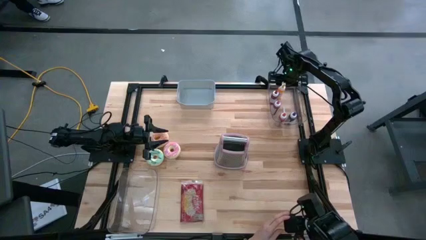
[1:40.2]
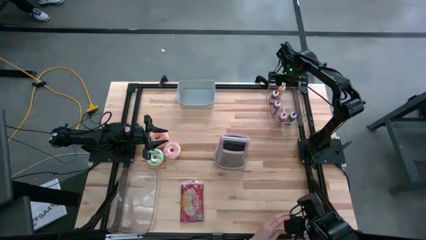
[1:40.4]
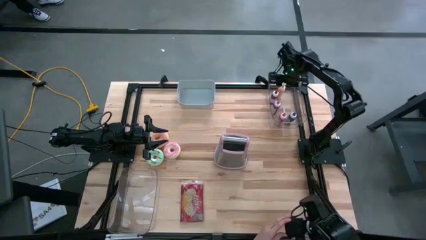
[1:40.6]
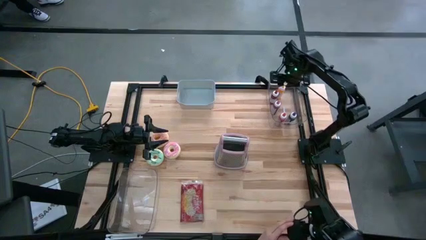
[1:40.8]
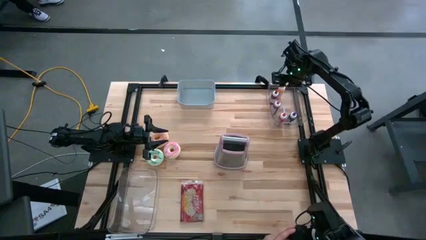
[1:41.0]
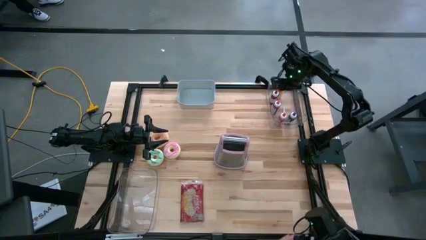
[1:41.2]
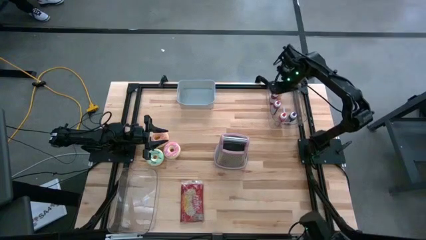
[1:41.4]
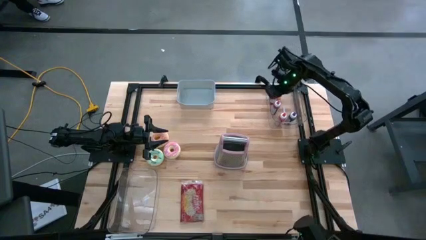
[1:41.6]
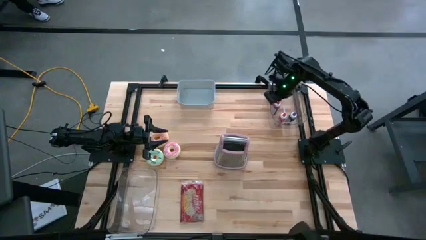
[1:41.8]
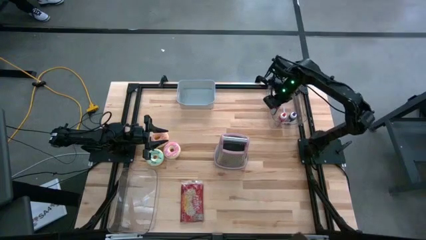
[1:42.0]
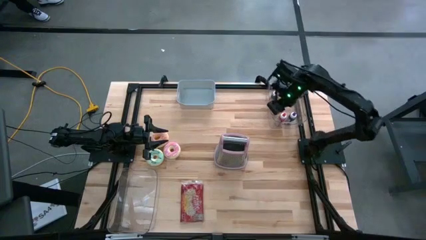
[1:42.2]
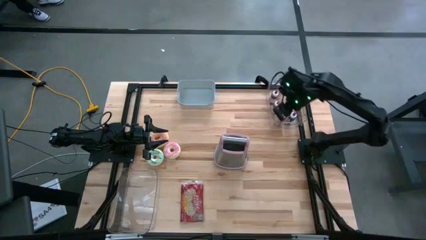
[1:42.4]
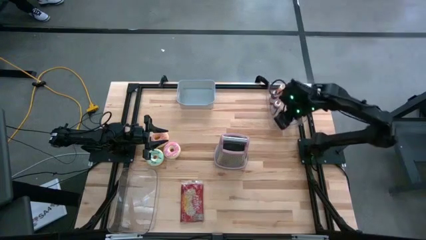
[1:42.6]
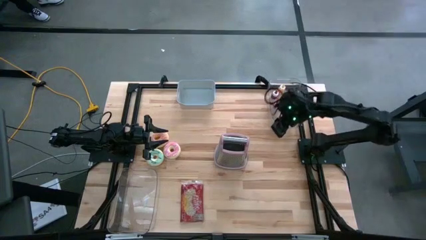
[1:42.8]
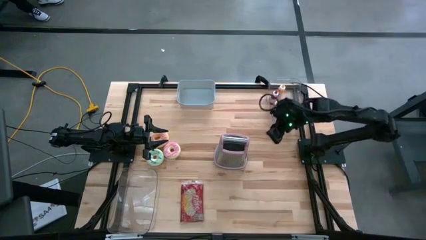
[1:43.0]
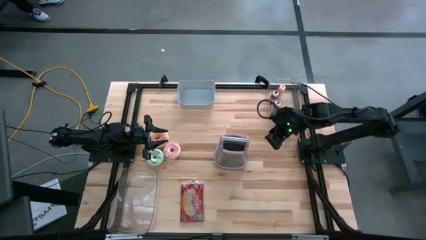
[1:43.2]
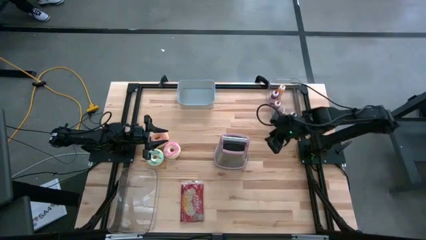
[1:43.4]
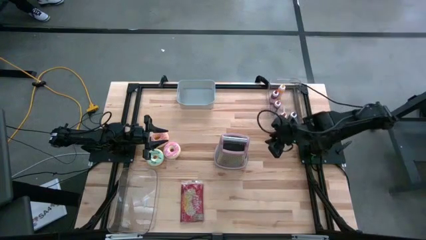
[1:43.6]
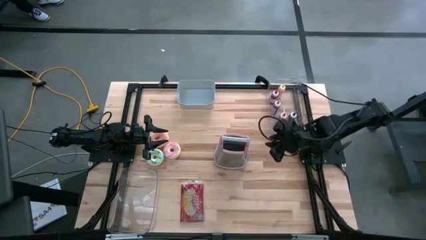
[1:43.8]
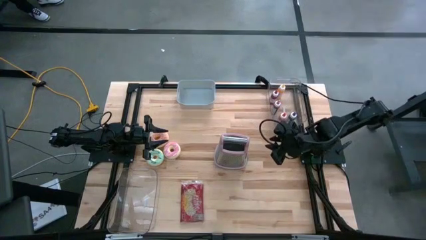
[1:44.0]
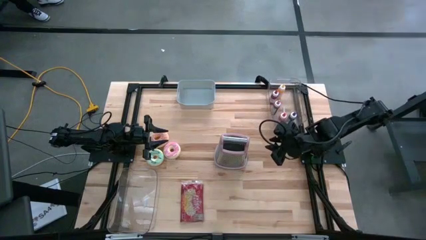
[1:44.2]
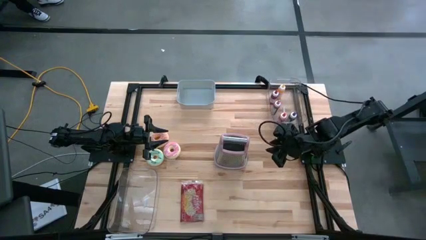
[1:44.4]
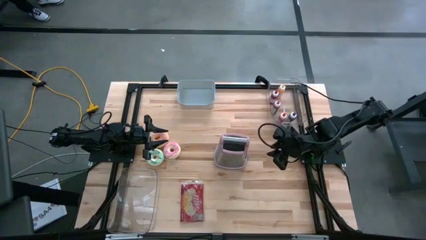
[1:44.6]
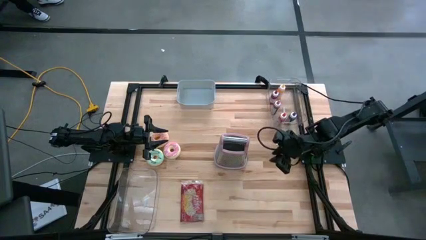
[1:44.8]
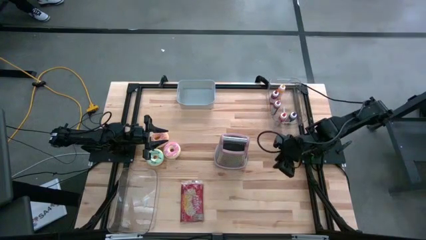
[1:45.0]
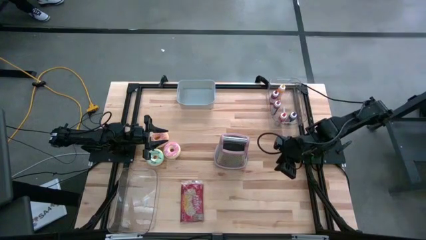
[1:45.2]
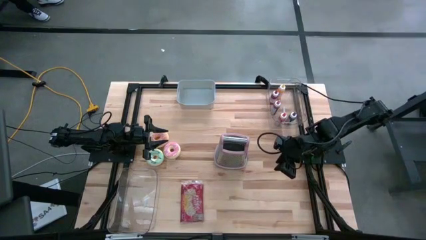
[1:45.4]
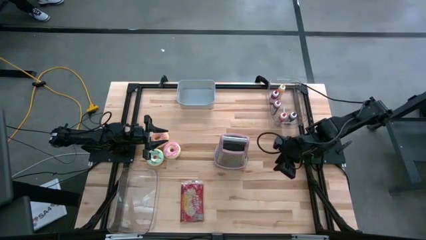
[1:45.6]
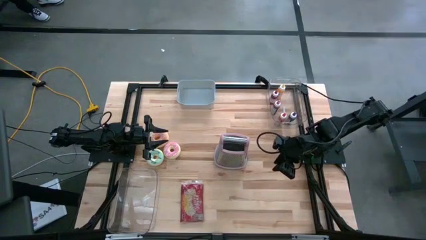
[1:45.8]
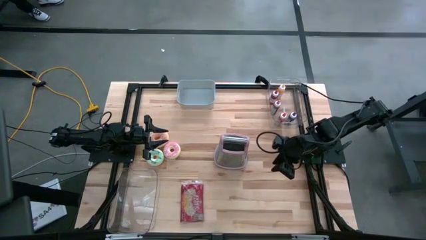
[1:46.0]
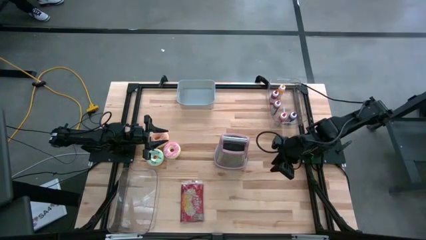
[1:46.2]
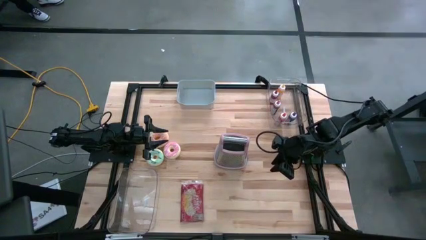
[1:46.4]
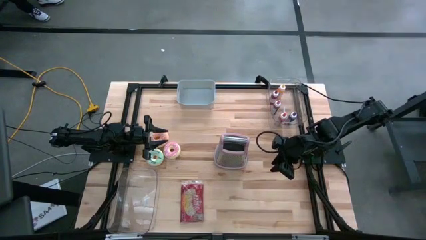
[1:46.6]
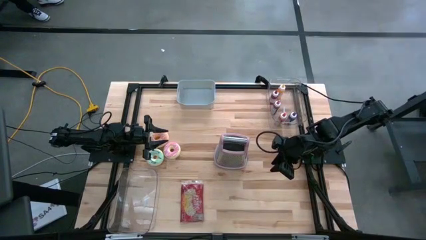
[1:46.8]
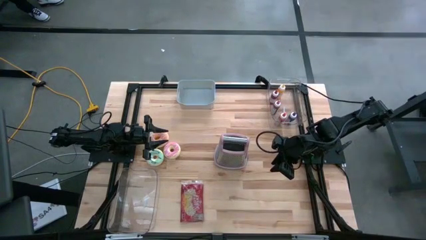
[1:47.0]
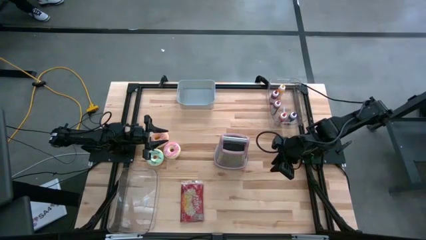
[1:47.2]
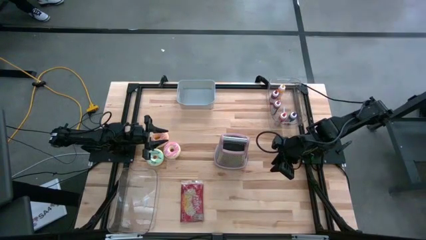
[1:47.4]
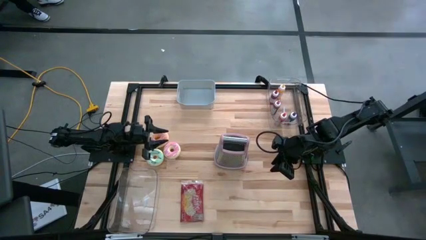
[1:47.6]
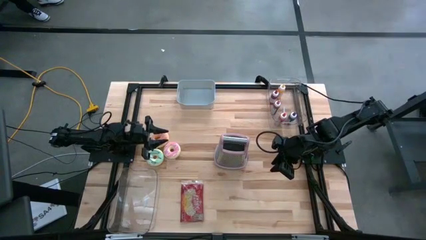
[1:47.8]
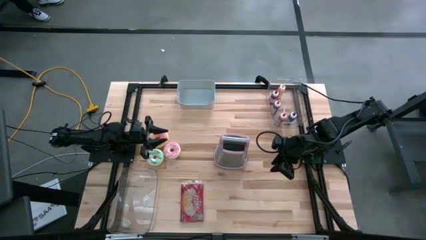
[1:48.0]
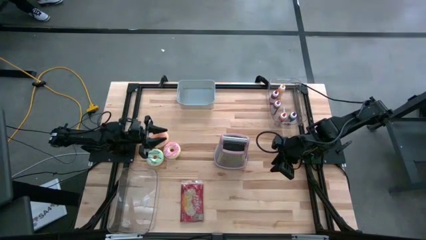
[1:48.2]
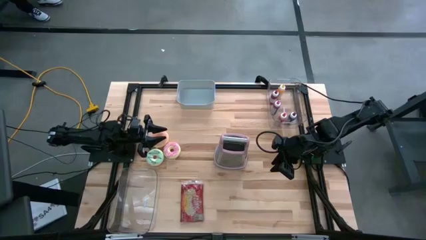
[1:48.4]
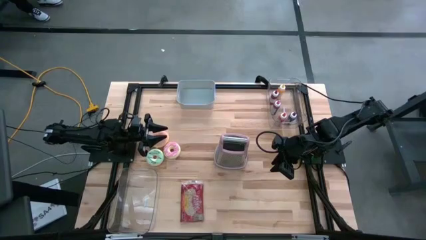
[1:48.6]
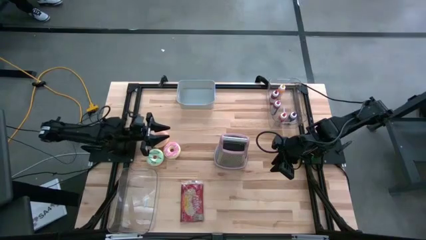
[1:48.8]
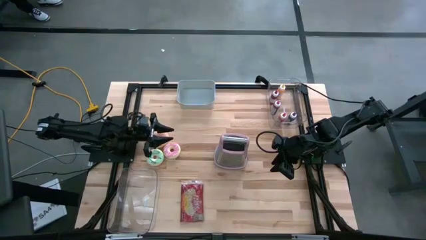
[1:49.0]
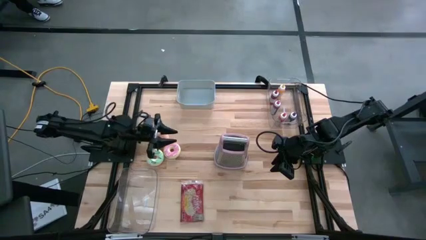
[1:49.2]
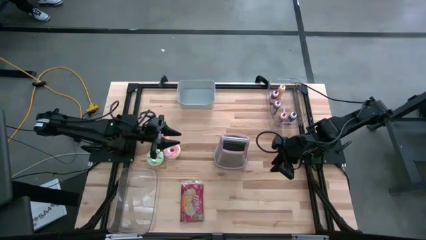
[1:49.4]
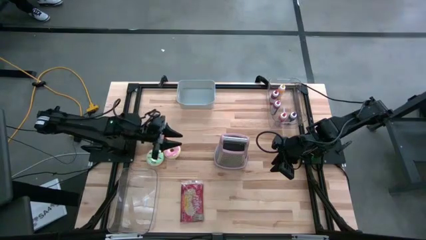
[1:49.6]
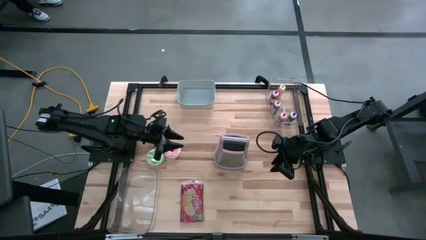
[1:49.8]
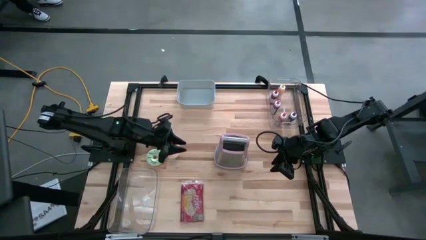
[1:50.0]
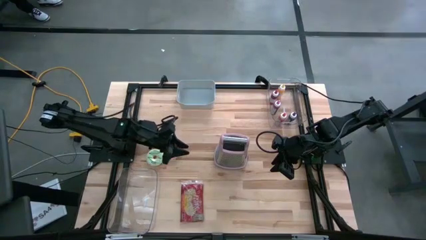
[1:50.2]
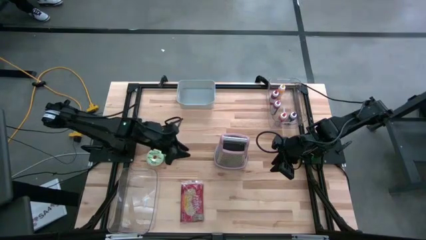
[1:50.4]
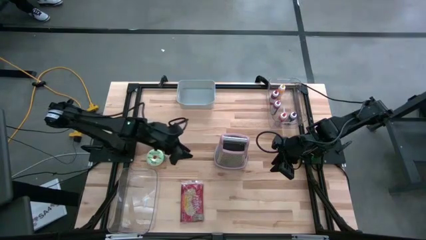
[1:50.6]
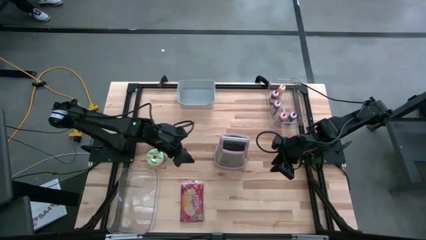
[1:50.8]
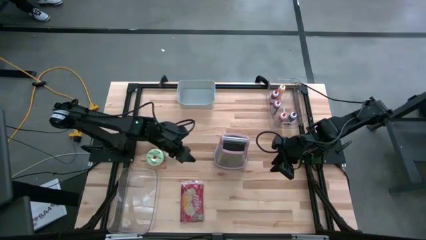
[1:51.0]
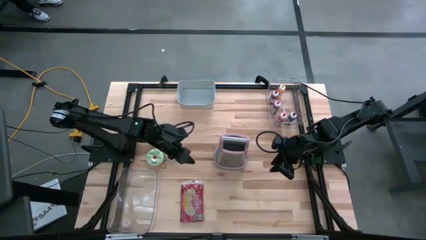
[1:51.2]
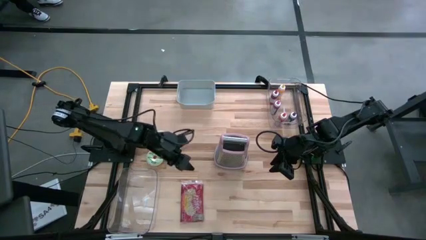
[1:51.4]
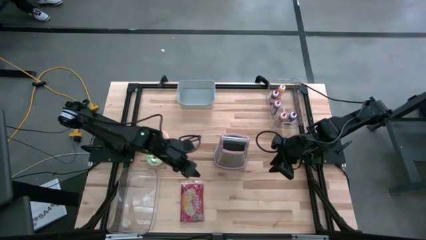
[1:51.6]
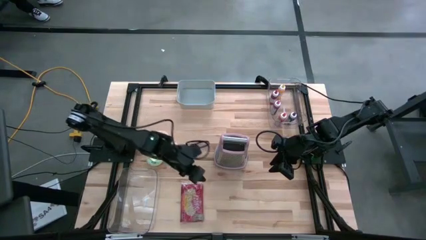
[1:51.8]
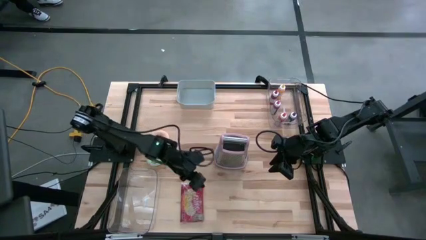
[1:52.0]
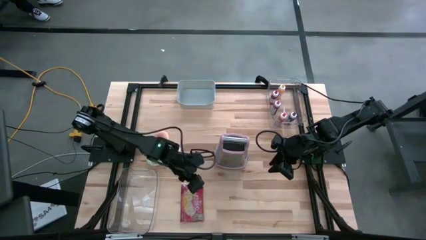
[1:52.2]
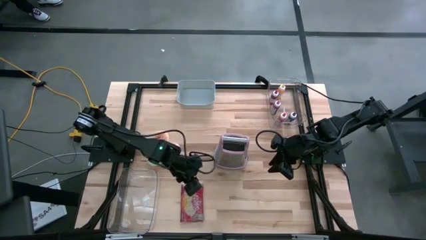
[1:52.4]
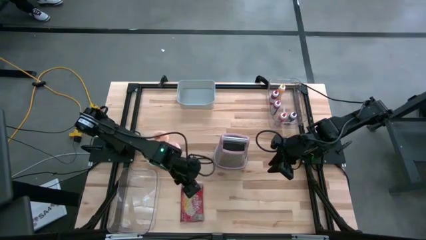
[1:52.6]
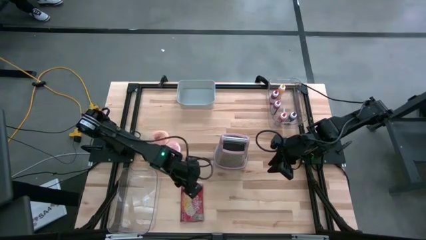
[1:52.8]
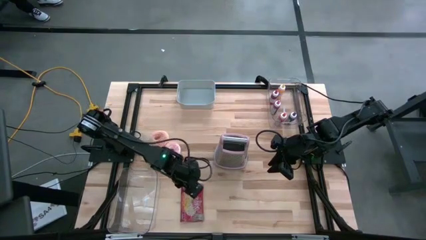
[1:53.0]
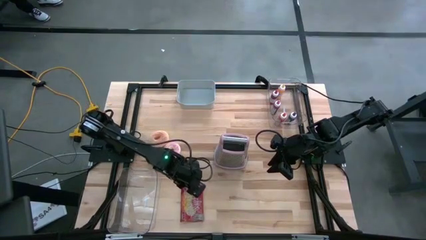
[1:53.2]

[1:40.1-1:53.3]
Put the popcorn pack into the left transparent bin
